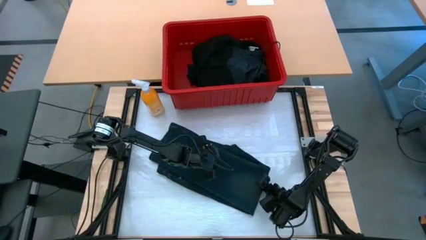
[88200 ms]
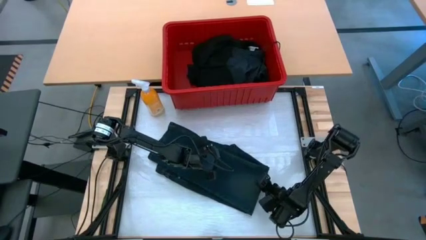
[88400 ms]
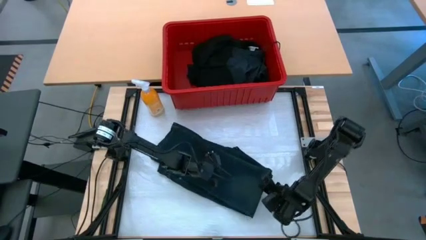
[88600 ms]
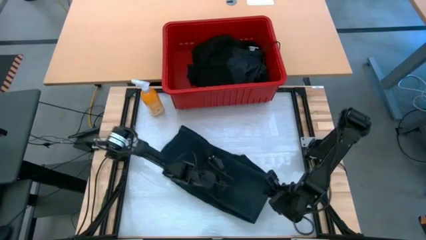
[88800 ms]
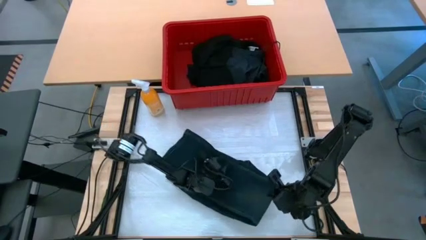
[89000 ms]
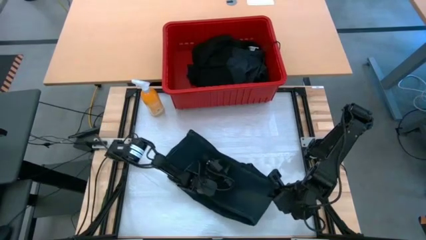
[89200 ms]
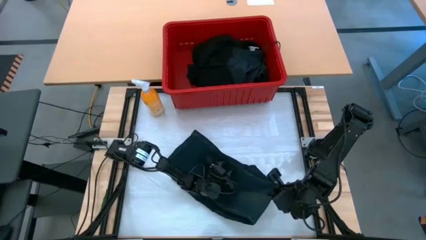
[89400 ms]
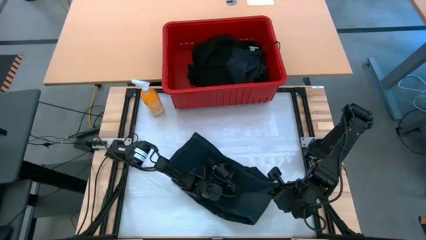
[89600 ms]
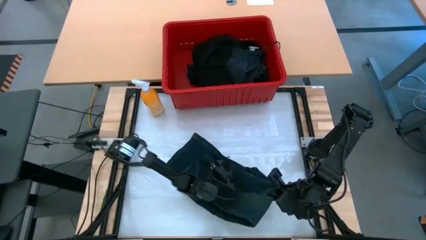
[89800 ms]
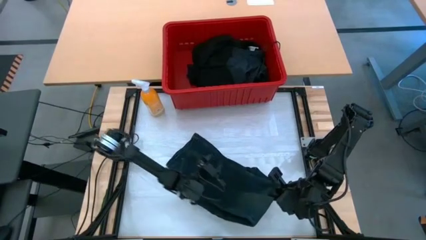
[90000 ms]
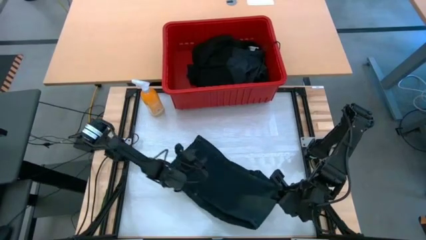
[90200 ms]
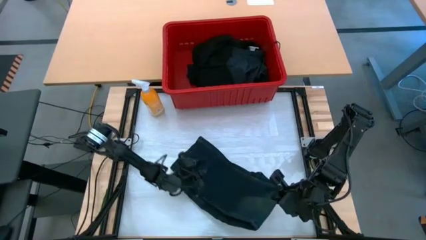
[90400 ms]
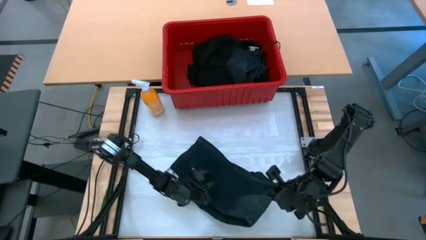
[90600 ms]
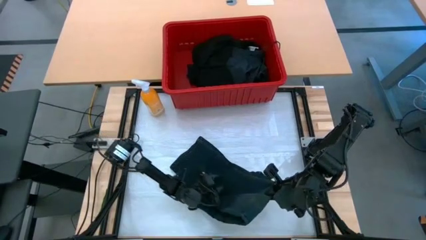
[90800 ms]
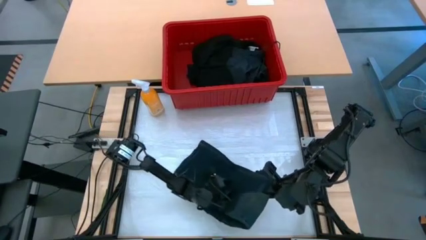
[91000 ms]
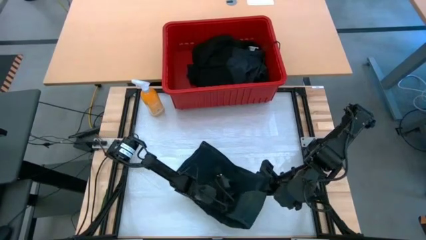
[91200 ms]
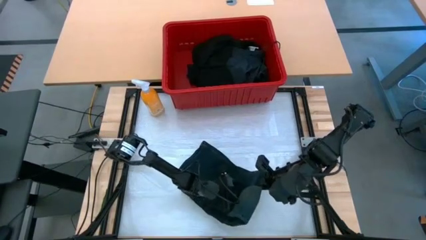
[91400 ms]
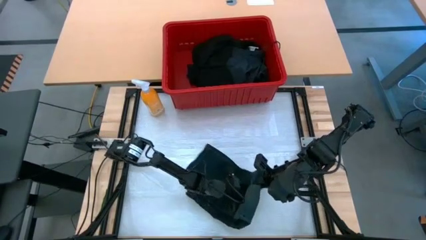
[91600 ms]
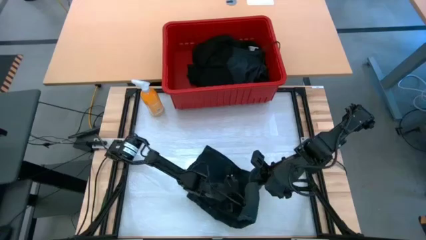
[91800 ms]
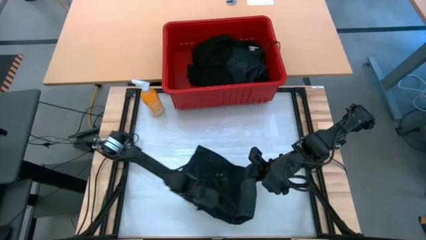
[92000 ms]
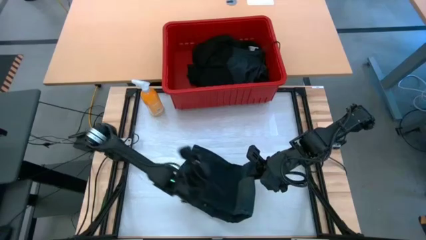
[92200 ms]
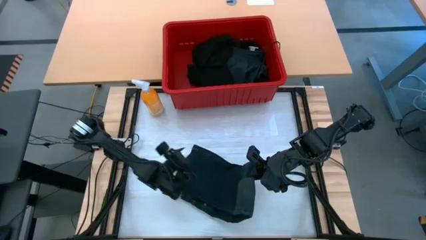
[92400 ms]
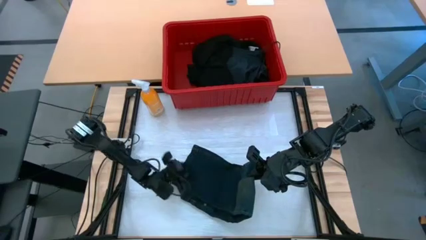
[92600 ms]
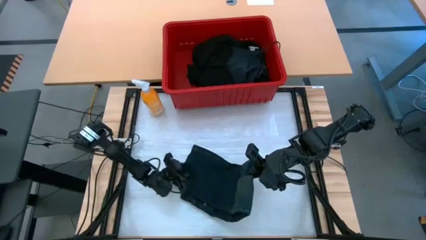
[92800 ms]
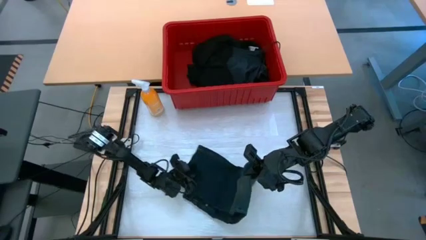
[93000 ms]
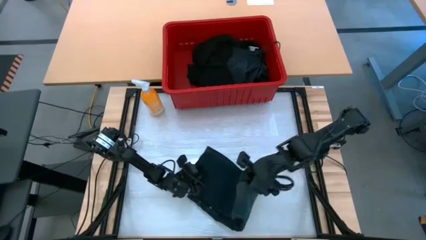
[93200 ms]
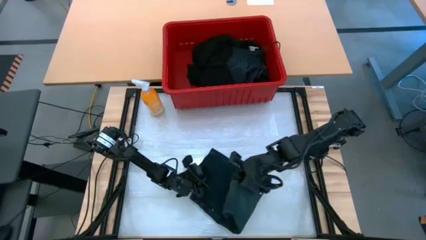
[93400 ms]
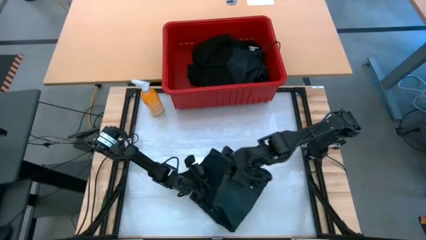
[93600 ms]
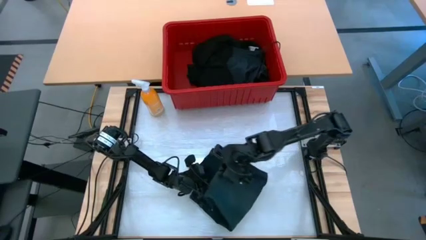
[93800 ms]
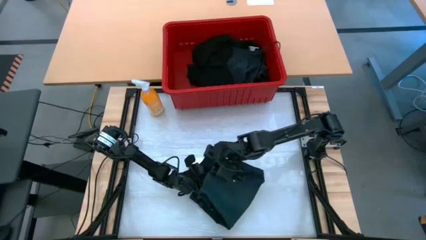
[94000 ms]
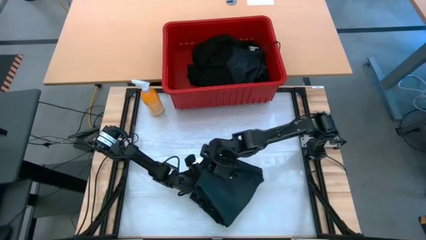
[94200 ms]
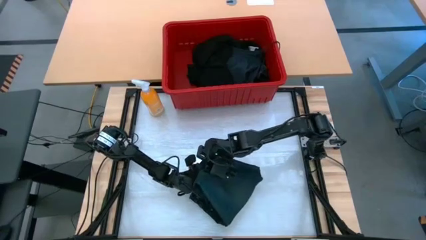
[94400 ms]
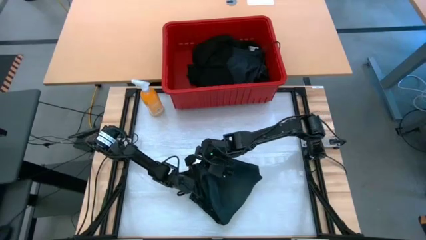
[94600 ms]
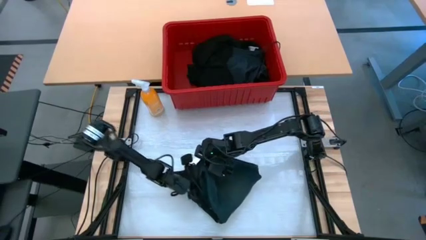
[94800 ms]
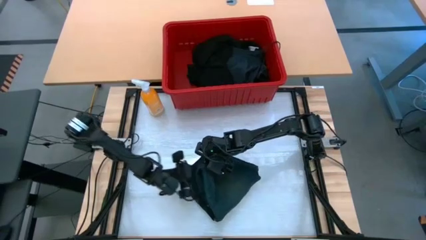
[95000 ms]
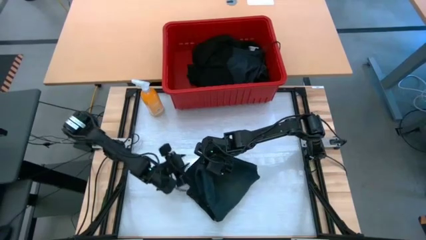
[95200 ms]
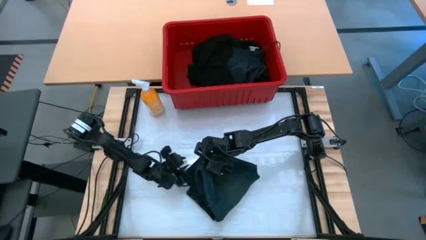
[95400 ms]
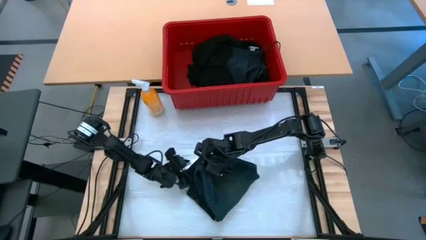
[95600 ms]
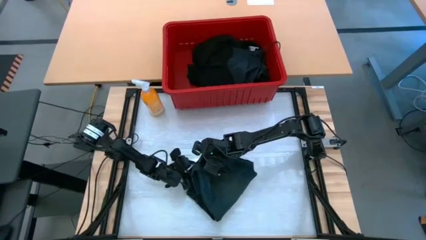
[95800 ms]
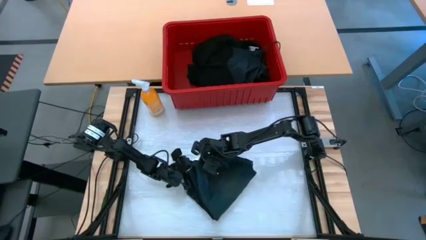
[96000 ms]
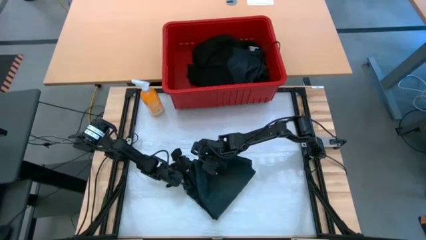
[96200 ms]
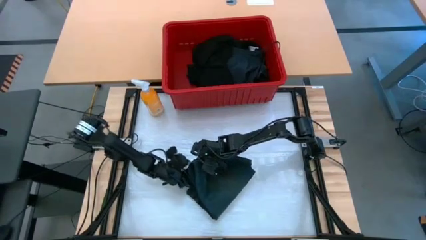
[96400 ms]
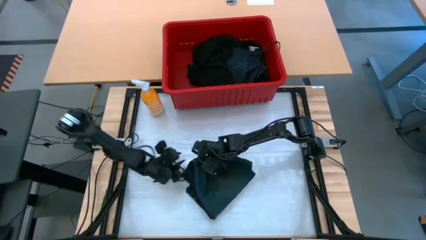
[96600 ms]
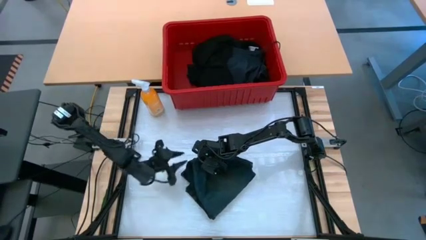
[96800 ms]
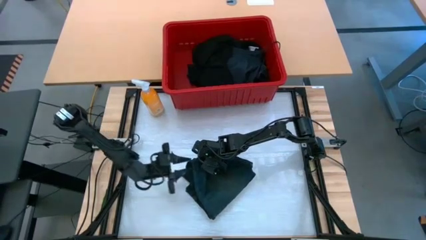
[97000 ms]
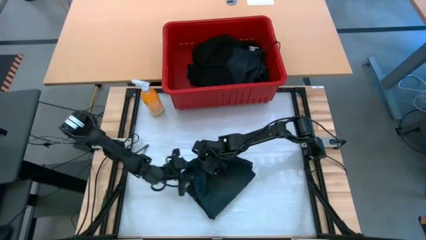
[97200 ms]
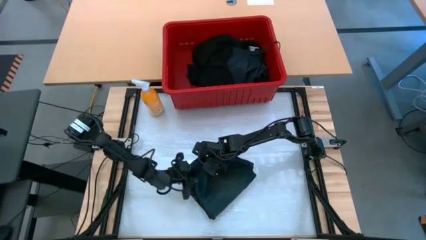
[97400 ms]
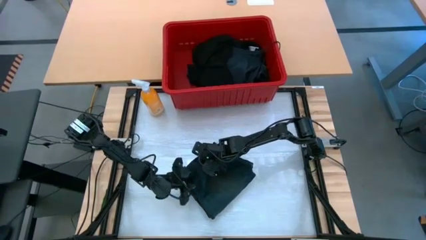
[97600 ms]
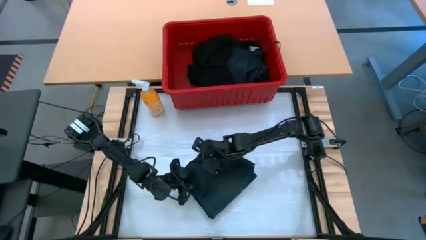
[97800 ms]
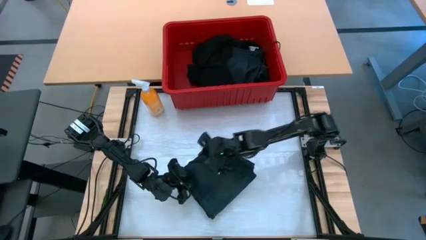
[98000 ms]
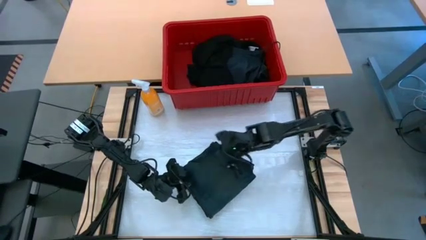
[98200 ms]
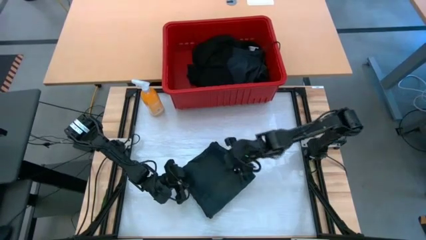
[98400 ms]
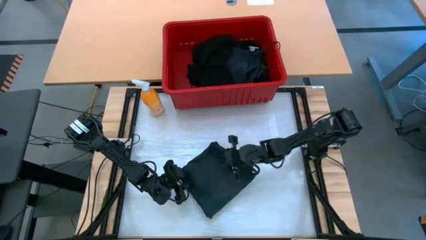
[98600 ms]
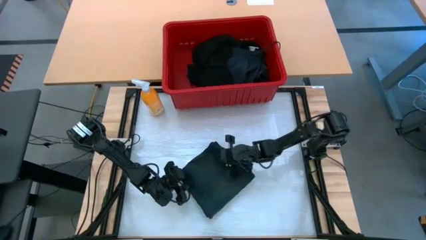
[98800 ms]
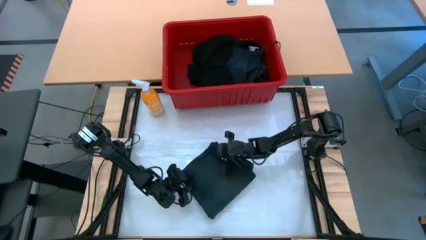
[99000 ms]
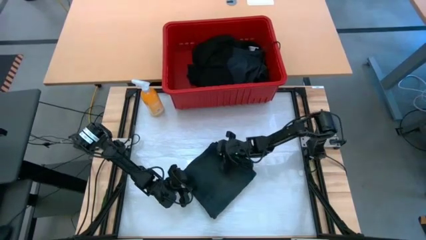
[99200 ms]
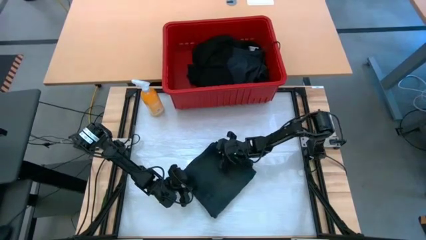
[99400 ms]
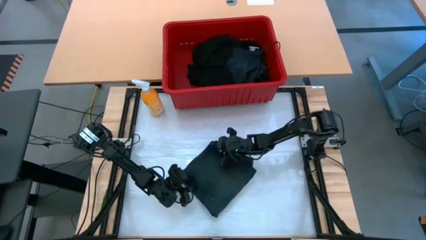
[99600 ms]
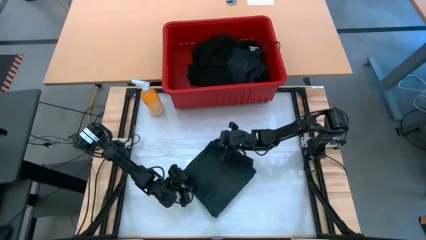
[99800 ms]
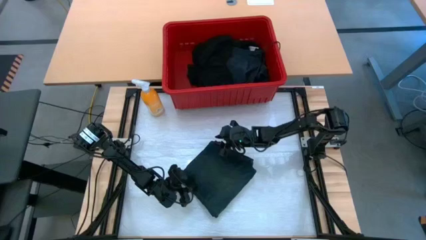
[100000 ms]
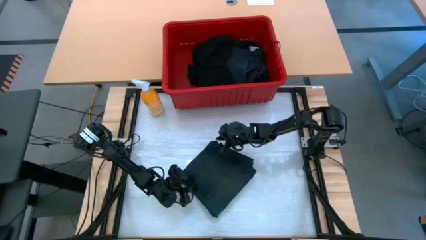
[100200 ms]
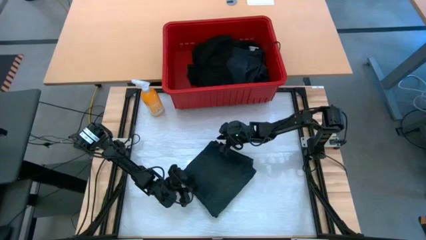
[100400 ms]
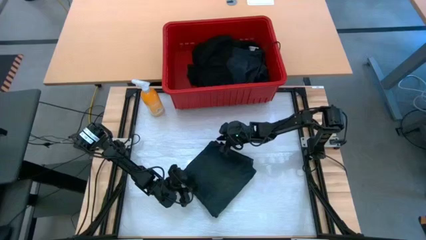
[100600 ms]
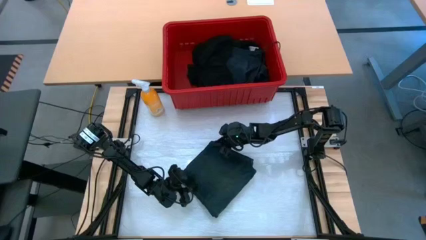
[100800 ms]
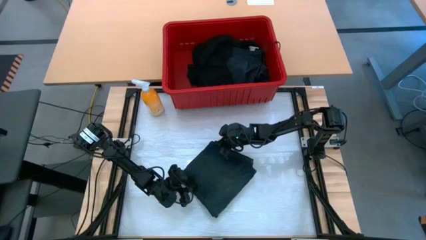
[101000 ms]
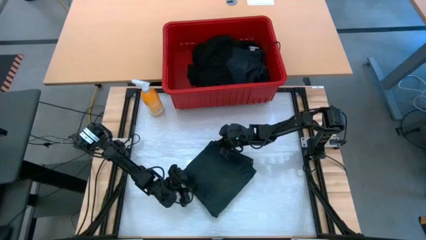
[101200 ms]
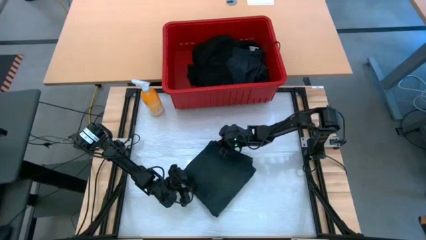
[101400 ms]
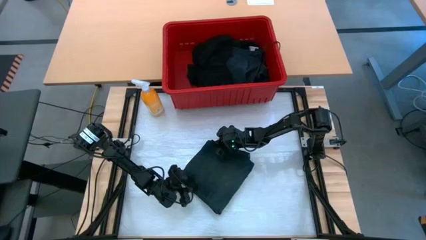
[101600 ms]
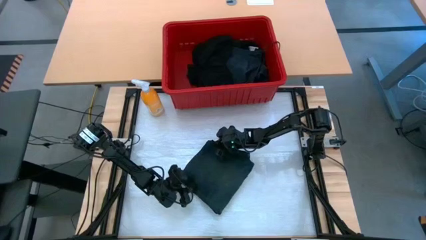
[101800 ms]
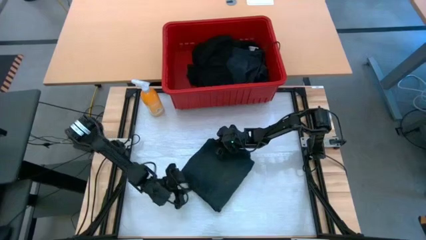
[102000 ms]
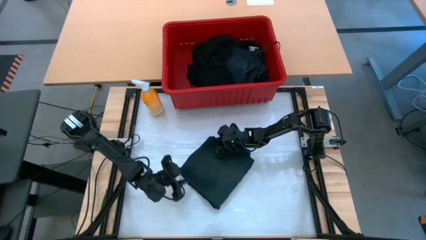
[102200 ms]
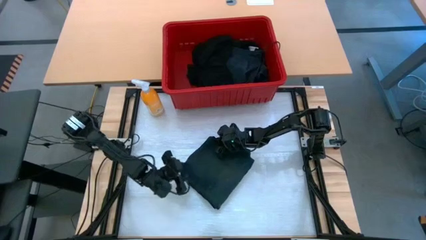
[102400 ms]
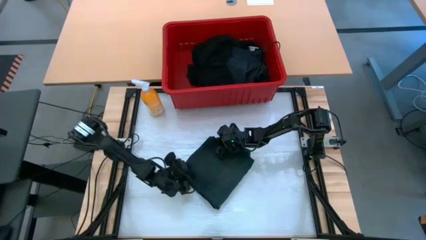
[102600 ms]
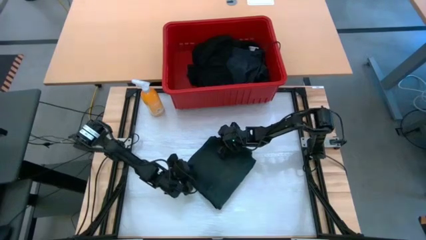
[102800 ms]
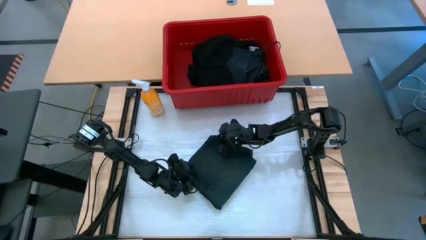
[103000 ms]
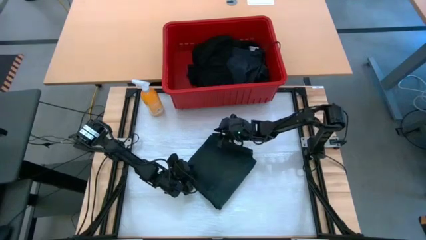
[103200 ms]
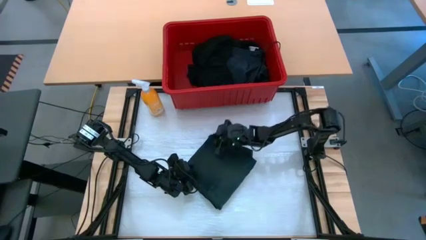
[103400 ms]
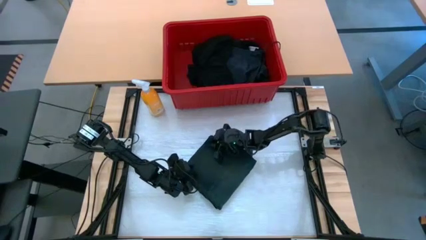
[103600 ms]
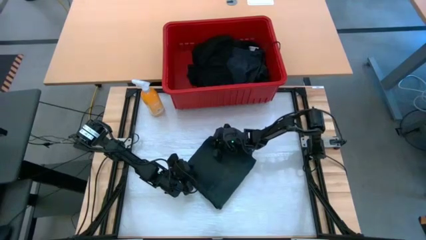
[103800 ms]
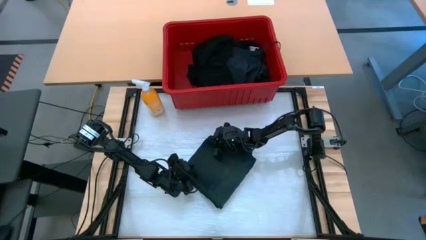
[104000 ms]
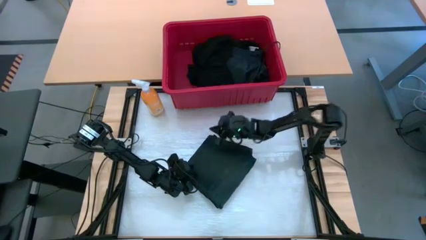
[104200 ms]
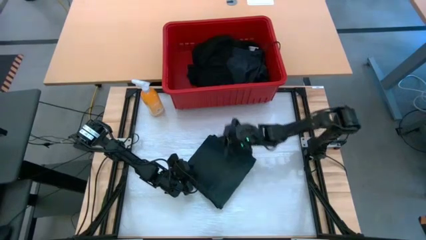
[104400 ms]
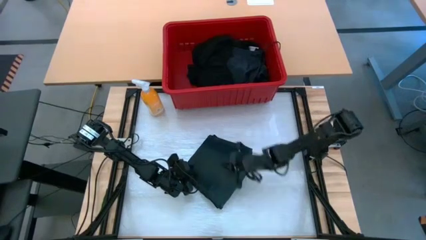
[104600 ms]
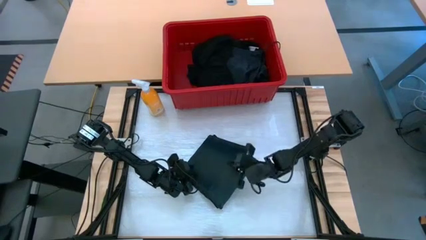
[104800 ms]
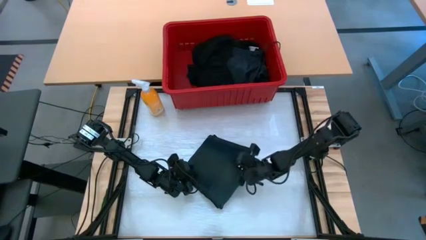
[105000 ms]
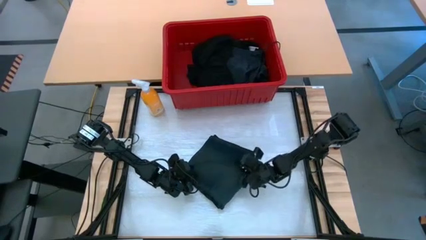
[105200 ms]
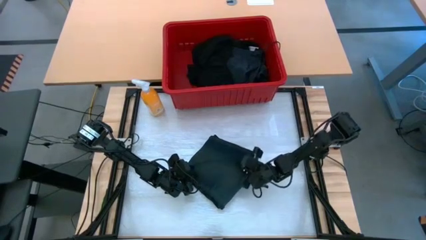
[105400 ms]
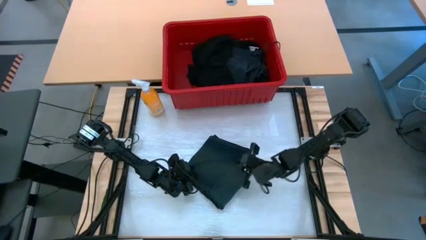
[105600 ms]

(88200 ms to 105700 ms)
Task: Fold Laundry from Bin
Fold the dark blue pants
